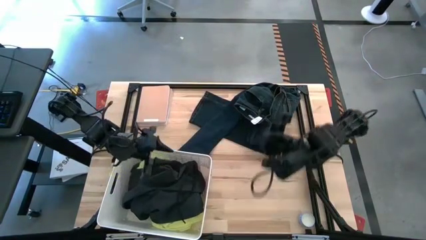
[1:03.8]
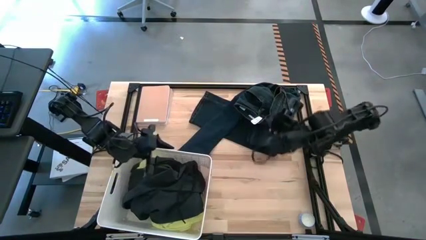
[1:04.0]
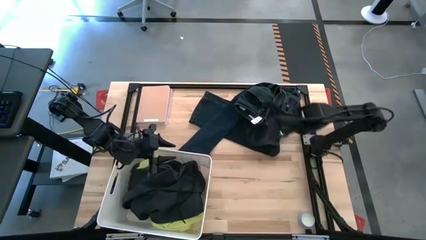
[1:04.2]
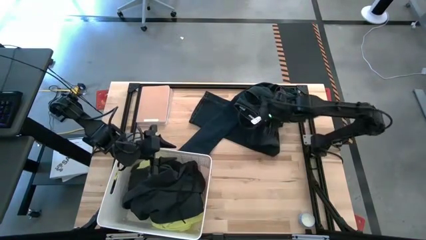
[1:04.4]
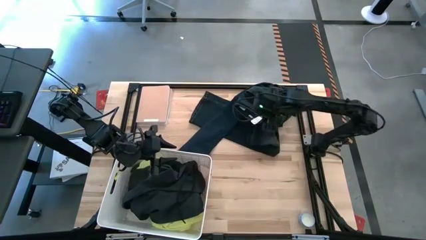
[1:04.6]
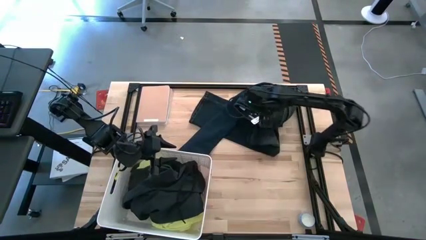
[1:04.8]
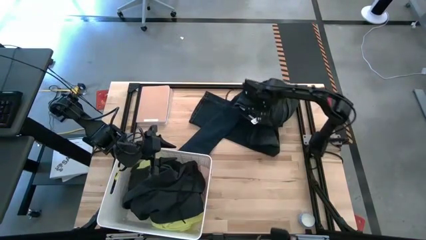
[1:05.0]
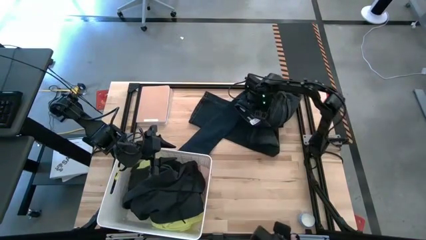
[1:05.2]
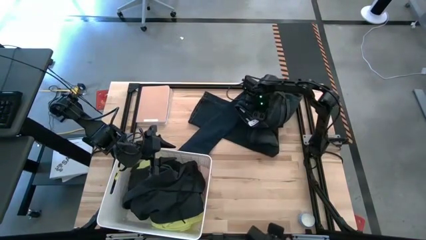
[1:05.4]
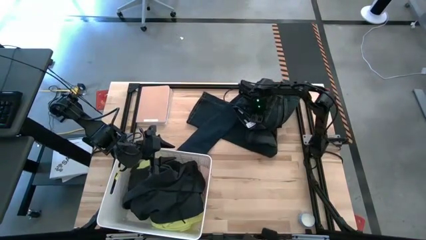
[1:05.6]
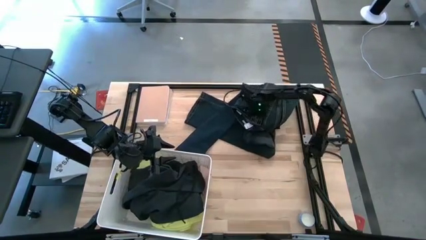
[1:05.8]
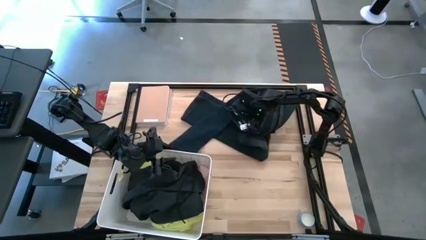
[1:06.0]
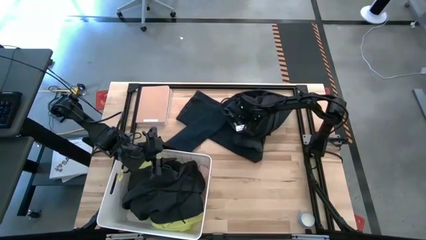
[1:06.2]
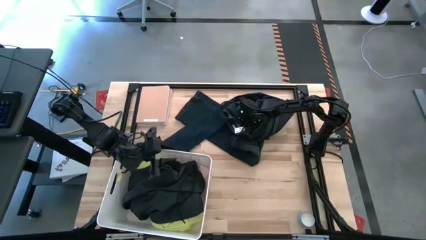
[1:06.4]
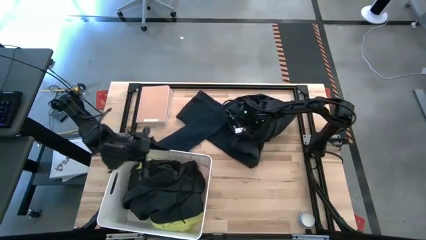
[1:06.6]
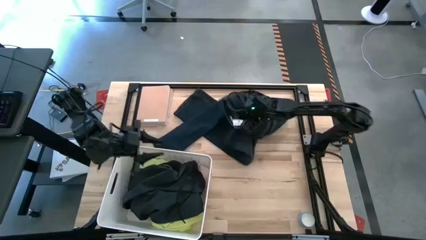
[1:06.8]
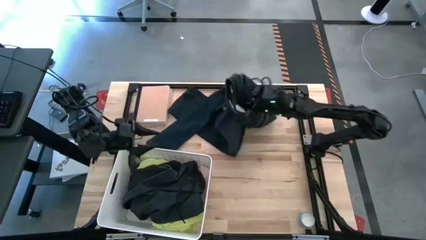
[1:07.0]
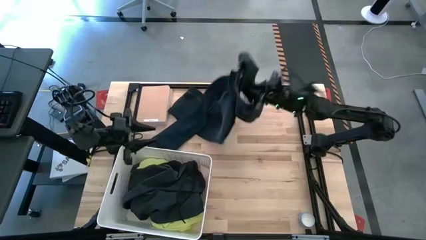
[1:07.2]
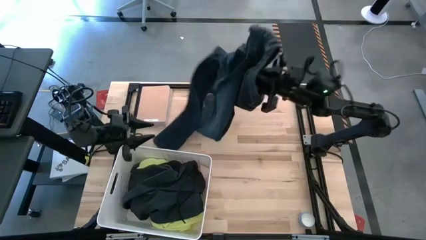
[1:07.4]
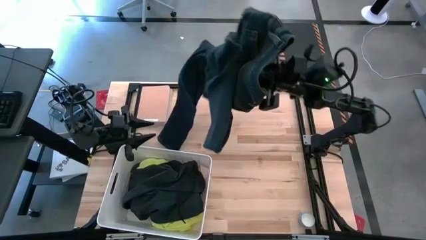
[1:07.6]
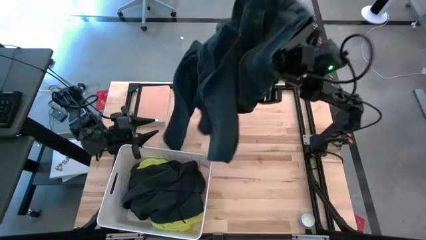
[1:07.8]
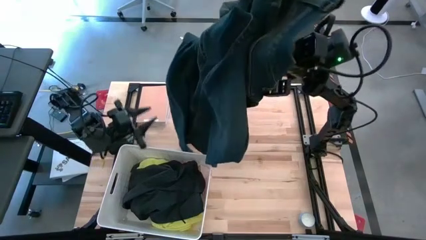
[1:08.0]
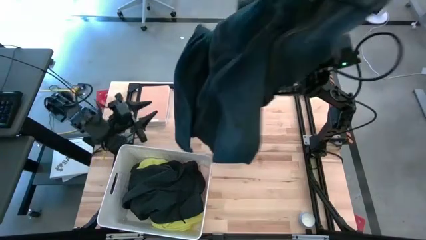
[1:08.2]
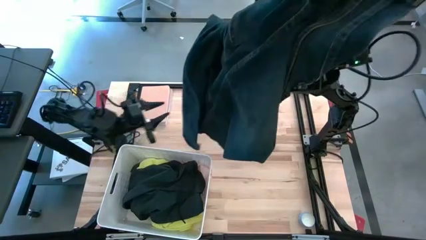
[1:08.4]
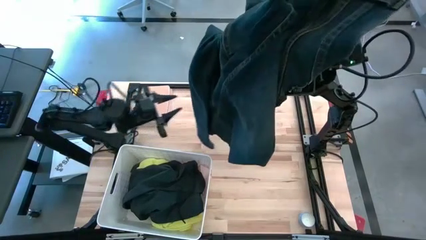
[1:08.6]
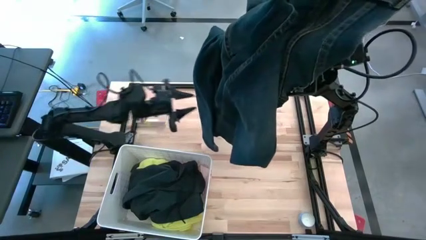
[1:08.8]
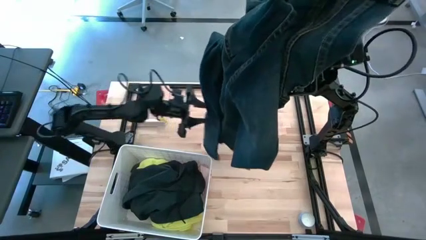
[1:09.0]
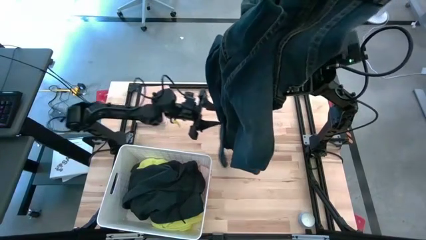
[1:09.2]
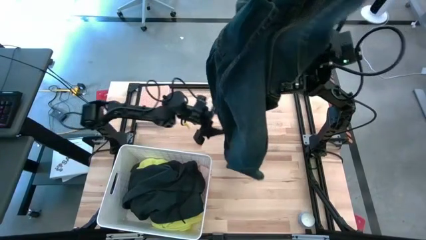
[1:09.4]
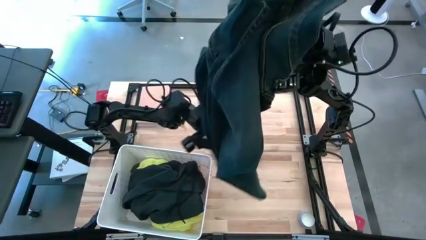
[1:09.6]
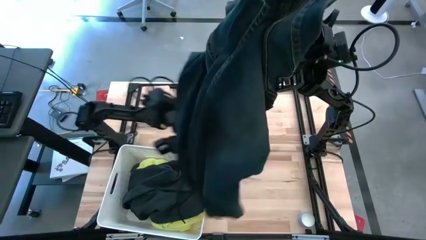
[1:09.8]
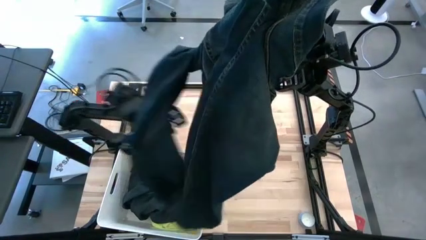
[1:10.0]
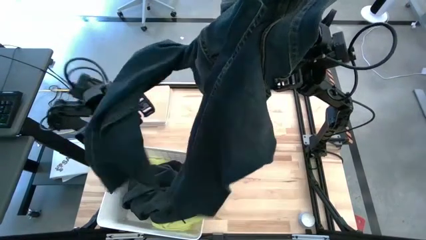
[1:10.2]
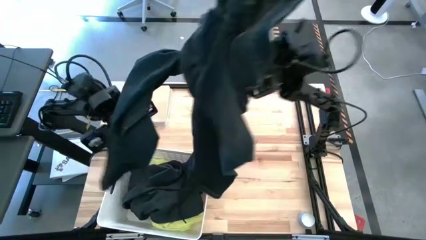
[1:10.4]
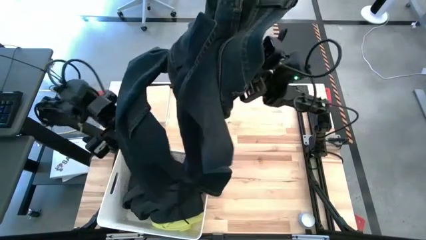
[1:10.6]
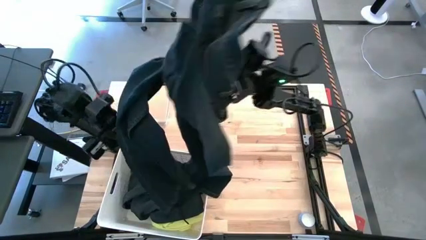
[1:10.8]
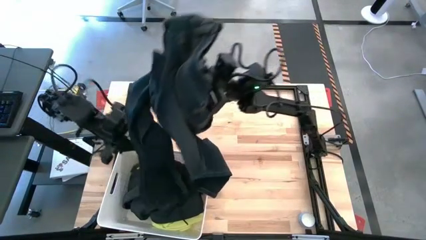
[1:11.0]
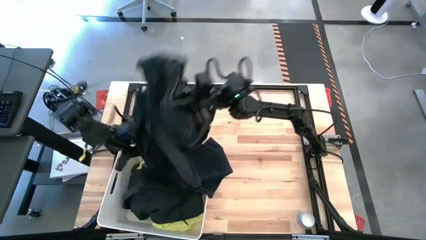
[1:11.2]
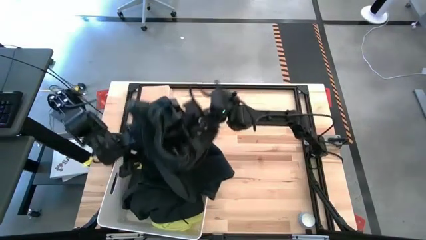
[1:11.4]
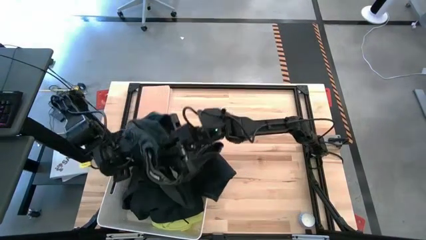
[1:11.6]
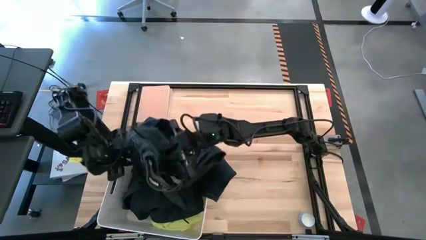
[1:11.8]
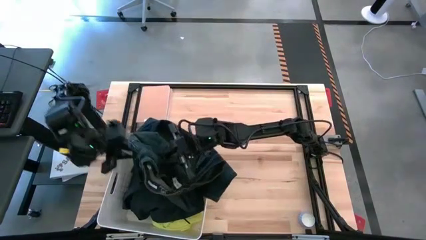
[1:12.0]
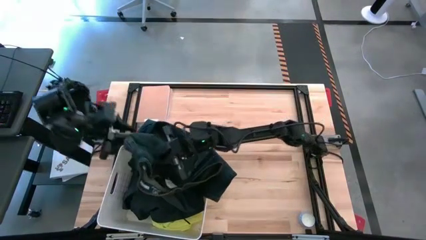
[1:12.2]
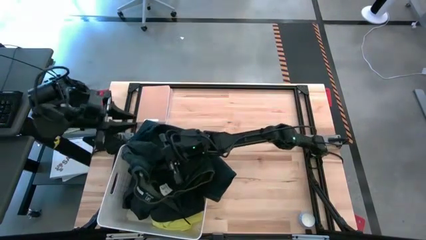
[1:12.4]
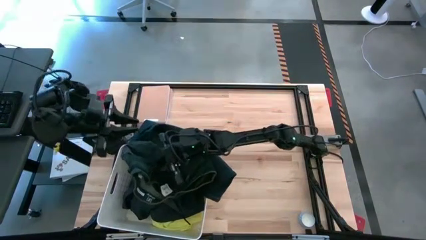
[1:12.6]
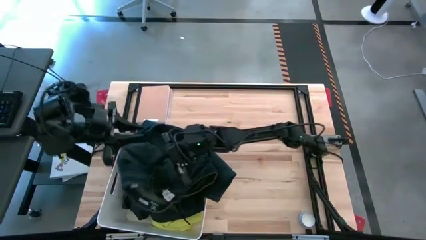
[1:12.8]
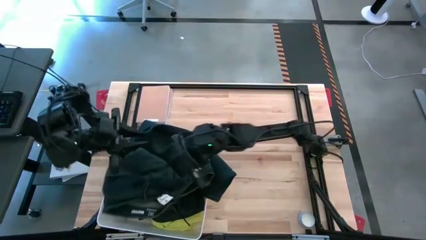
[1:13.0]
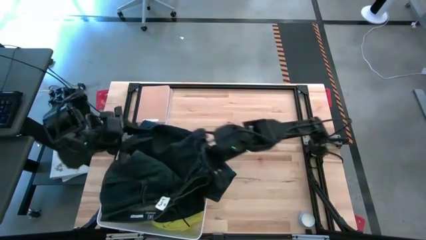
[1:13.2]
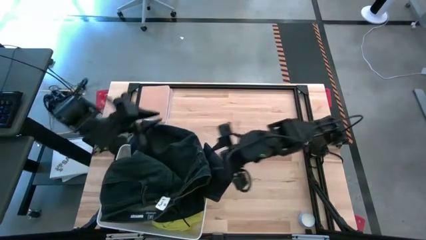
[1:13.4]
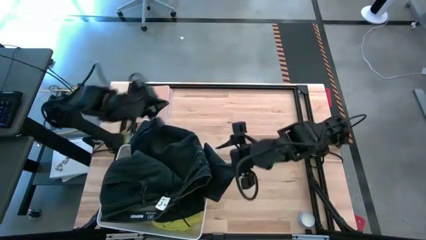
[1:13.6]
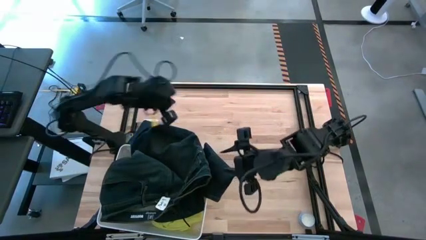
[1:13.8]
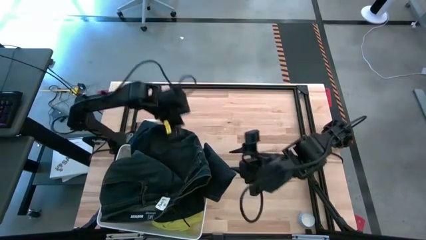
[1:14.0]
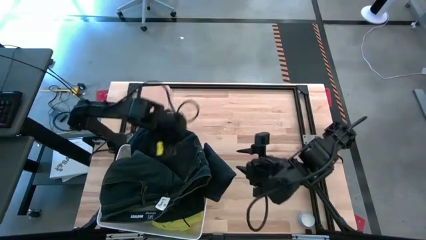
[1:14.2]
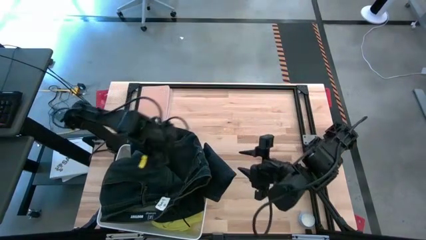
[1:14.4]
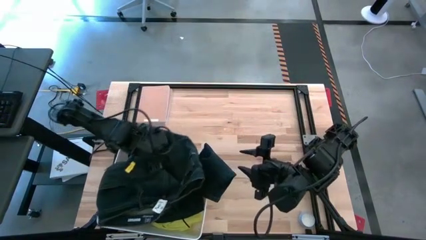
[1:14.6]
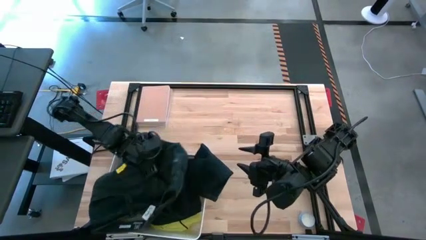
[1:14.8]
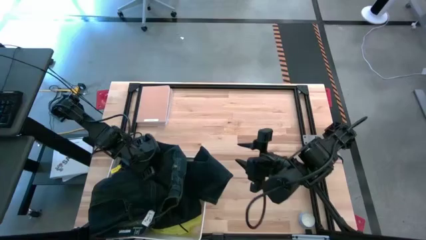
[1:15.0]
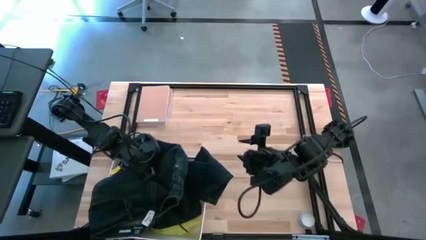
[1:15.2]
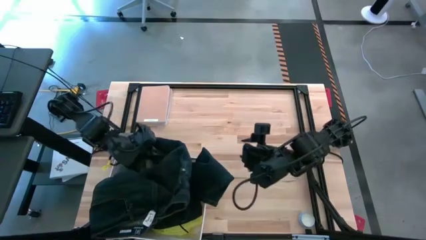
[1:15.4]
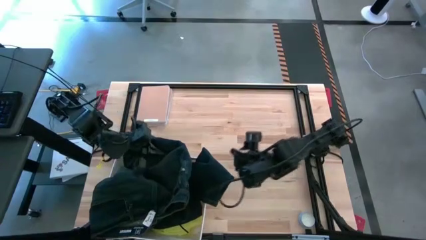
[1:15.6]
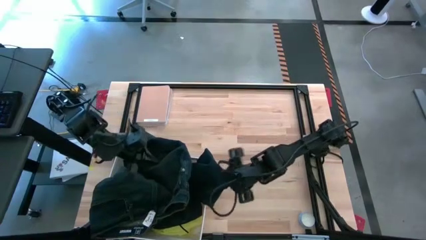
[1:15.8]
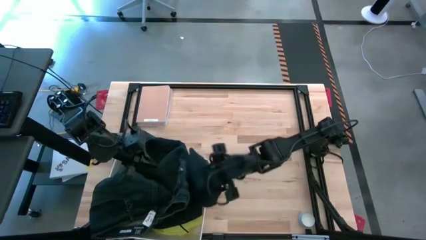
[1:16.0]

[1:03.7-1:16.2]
Task: Sort clothes
Put the dark blue pants into the white bin
